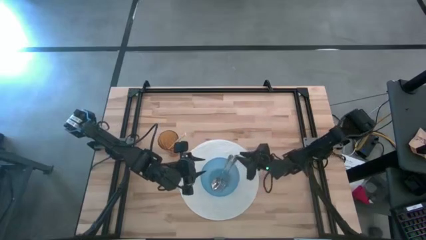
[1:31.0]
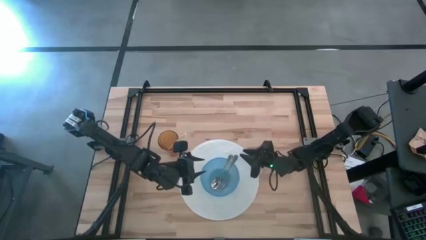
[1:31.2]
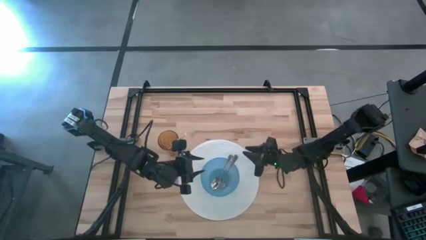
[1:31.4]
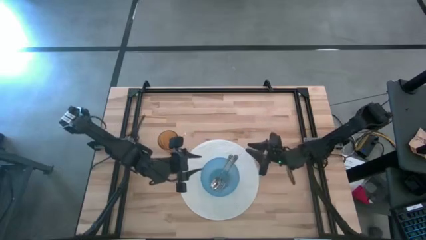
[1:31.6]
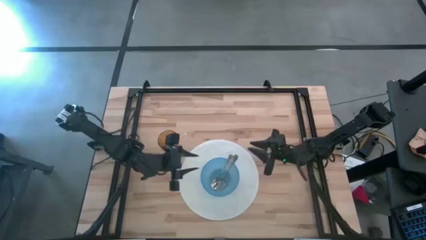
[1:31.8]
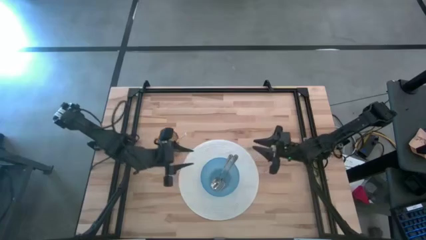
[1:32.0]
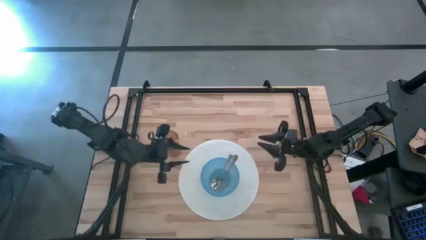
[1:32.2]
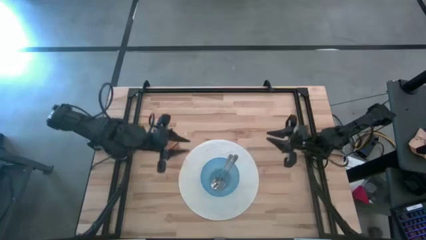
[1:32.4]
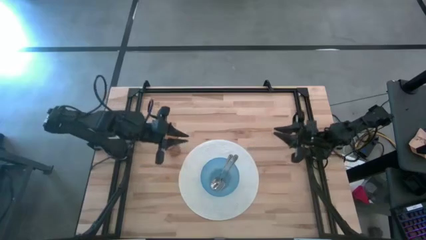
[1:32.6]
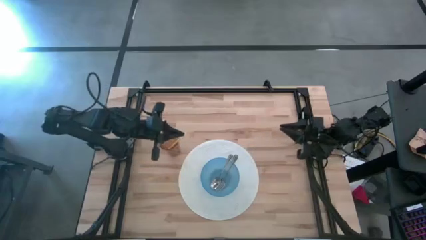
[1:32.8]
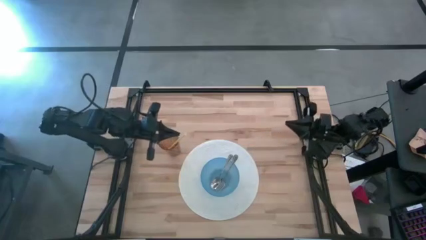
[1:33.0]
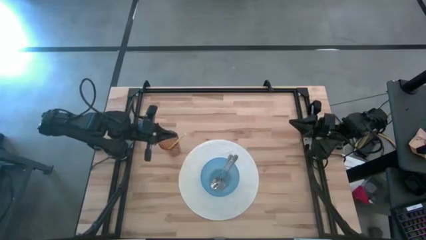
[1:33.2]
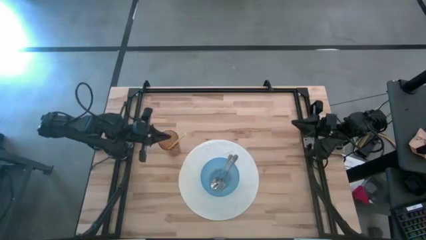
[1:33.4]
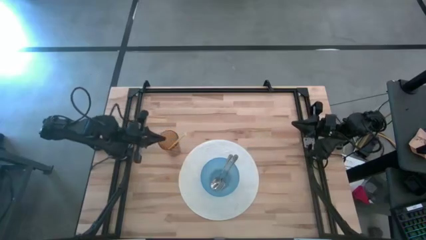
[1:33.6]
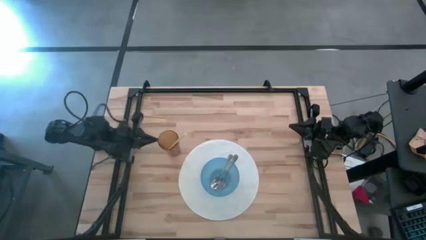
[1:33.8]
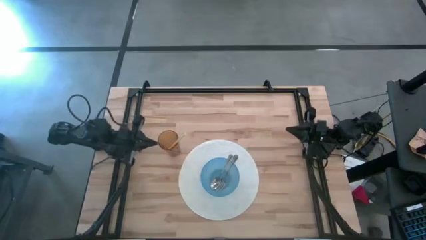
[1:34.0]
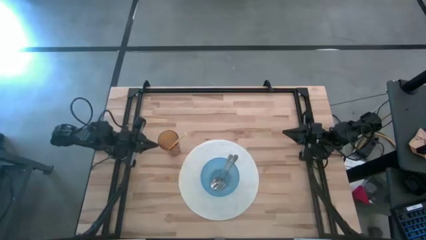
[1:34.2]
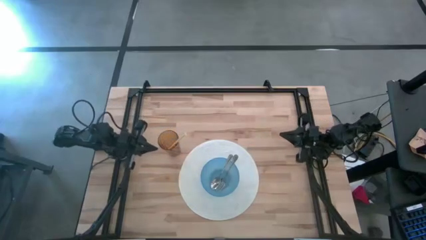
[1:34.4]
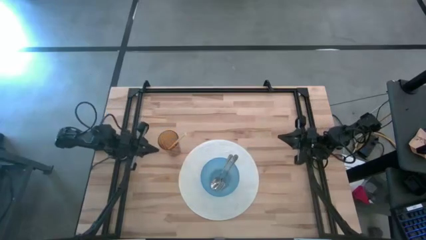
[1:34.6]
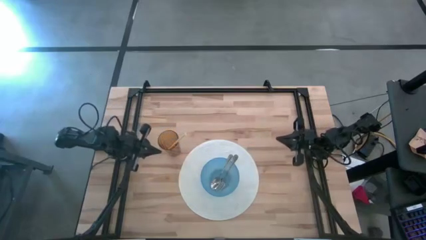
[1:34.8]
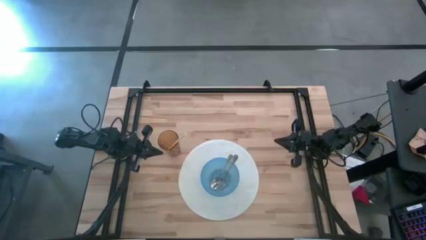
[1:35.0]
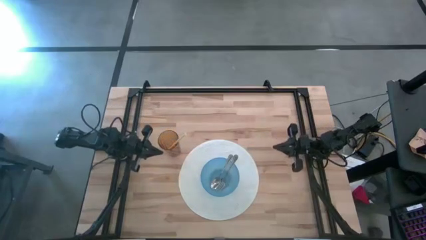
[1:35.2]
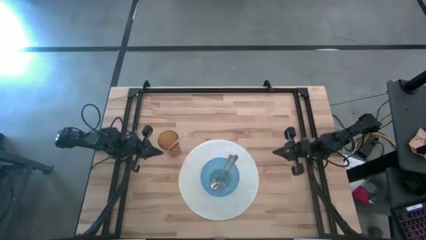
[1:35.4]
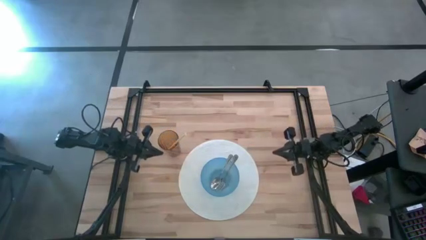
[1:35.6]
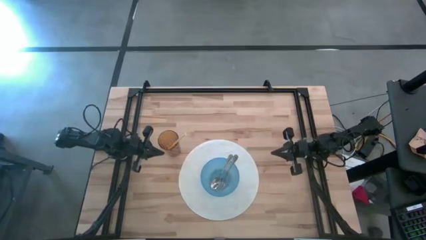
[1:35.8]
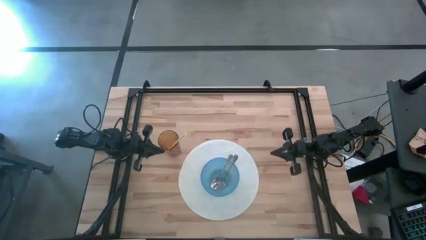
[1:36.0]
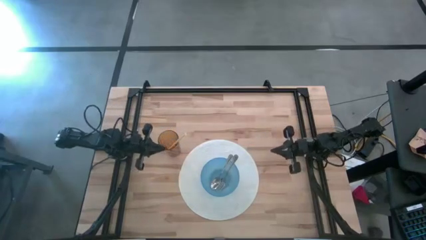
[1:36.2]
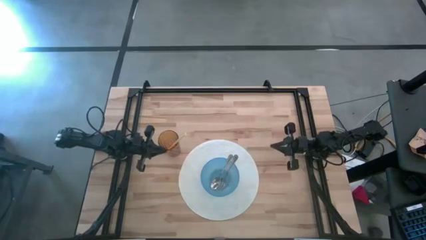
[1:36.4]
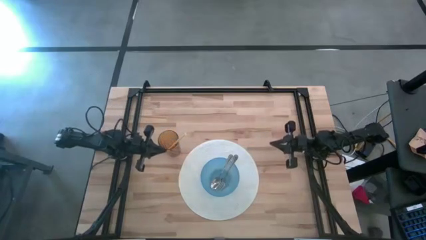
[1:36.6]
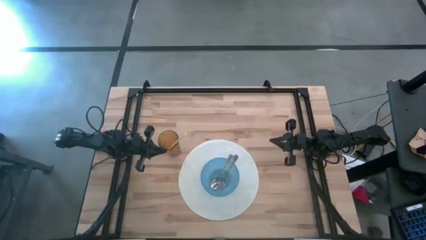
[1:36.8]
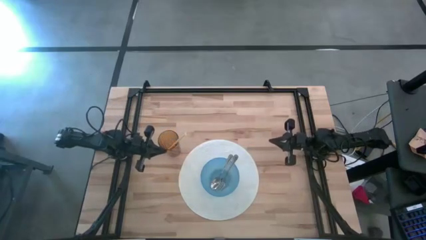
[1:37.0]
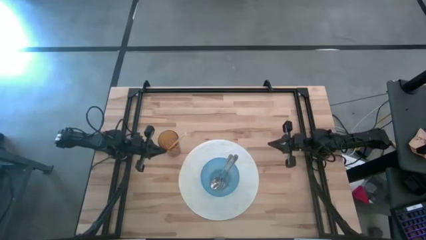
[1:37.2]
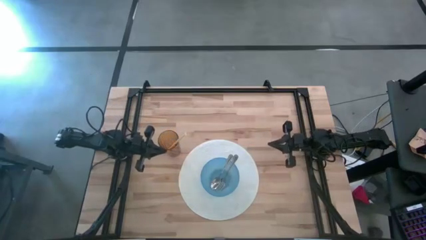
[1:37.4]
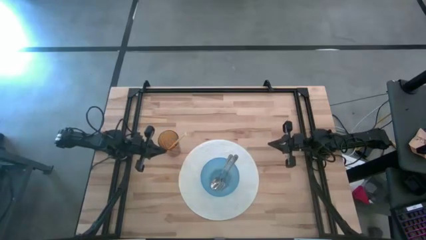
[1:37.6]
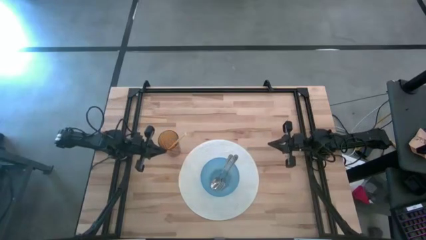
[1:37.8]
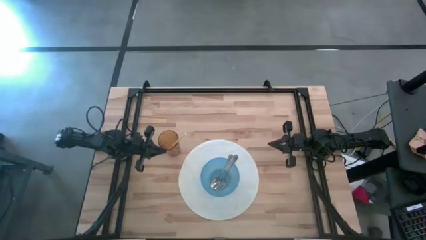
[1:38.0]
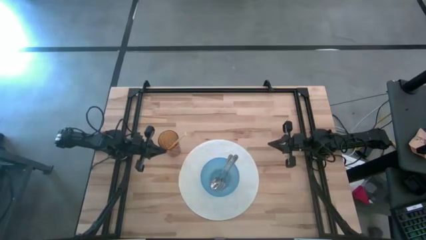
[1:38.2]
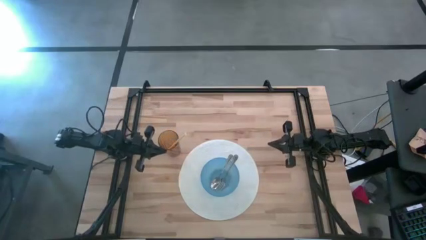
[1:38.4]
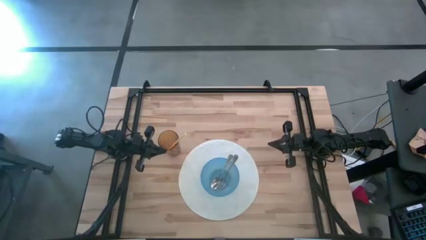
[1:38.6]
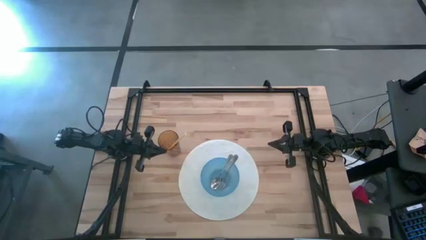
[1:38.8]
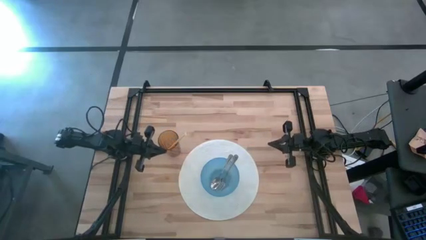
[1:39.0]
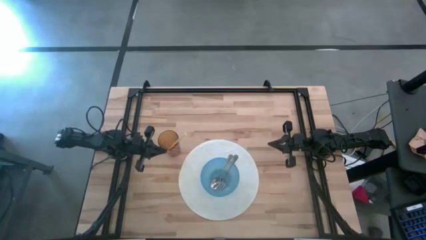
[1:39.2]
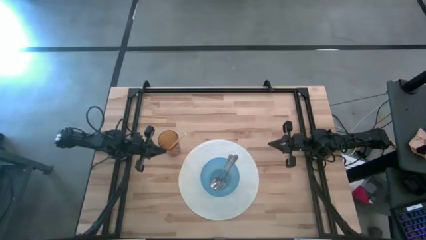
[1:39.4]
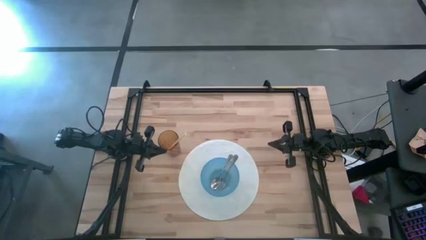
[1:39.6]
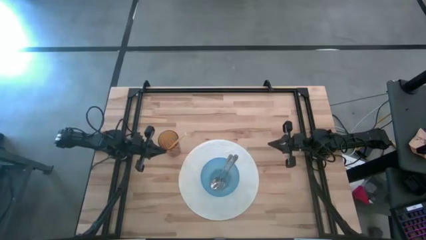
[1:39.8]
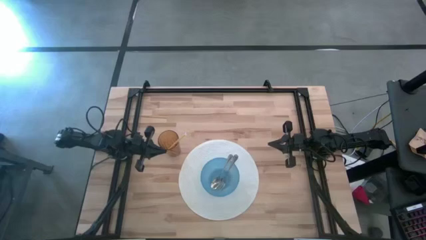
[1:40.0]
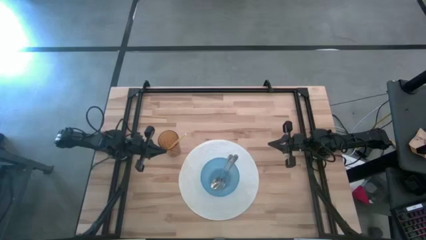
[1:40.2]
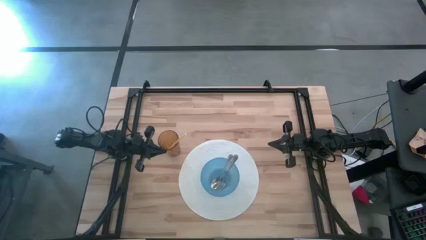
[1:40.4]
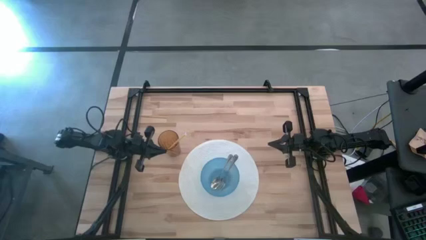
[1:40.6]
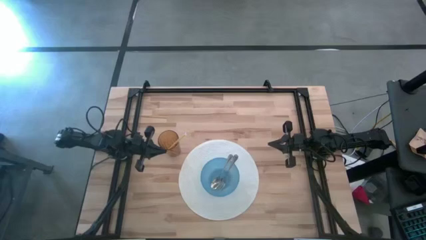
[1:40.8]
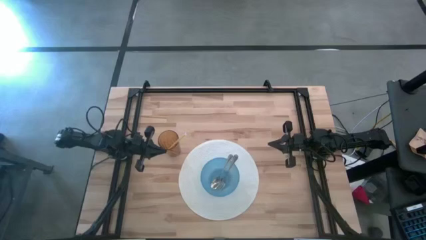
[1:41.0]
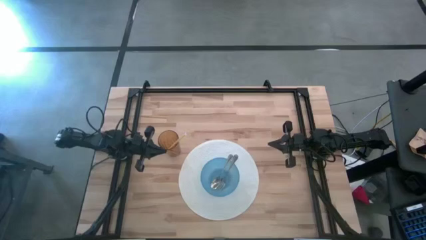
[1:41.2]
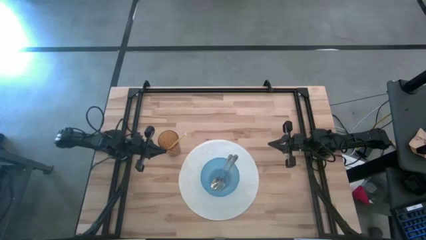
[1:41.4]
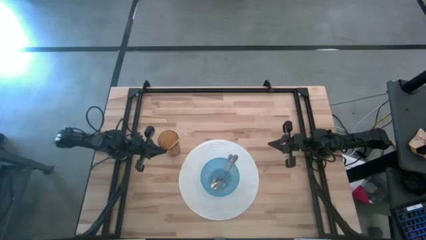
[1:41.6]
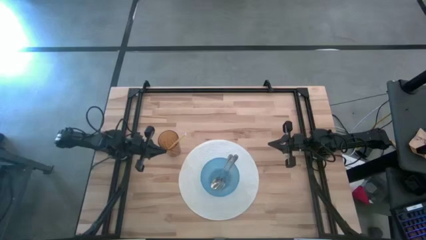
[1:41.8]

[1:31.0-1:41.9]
Task: Pick & Place Utensil
Return to Home Position
